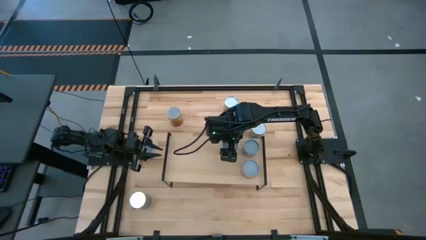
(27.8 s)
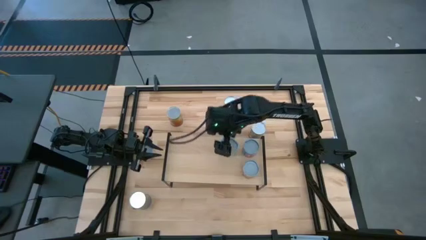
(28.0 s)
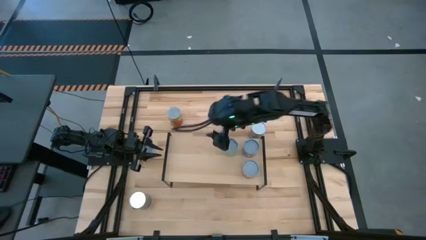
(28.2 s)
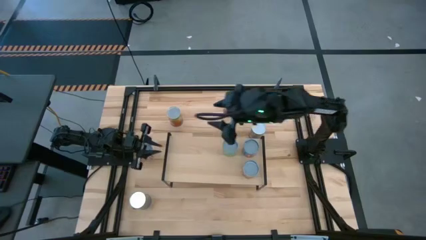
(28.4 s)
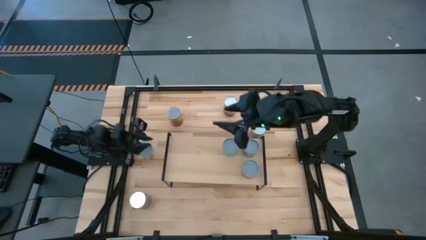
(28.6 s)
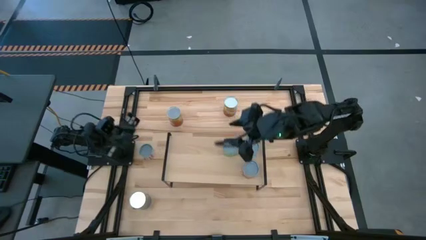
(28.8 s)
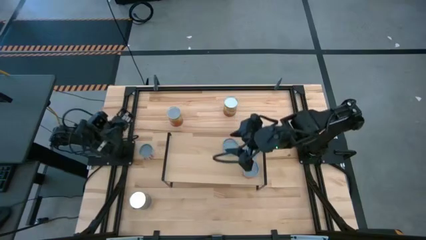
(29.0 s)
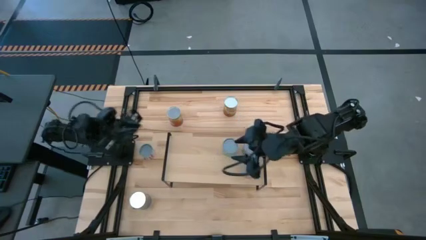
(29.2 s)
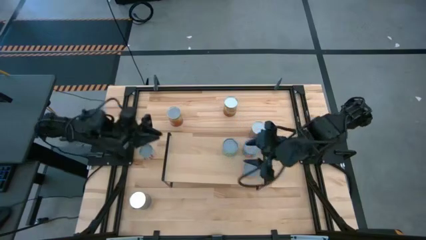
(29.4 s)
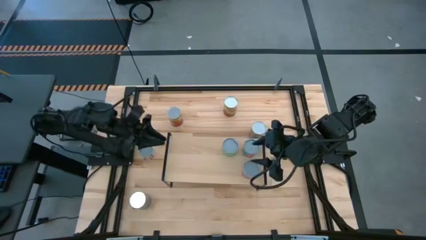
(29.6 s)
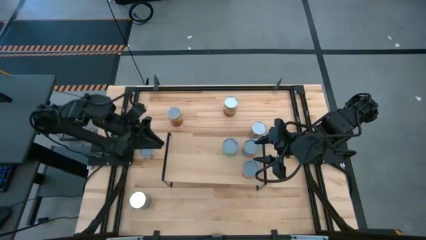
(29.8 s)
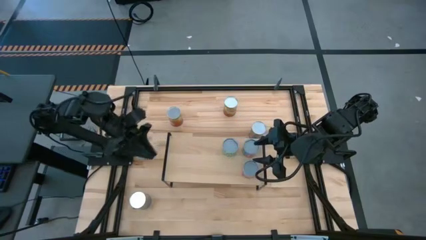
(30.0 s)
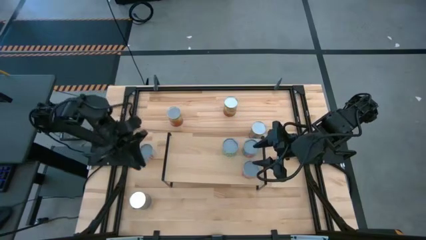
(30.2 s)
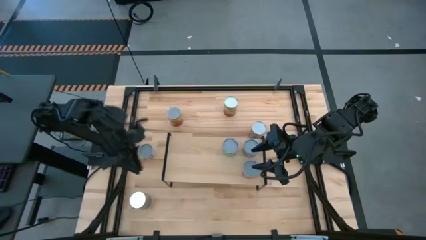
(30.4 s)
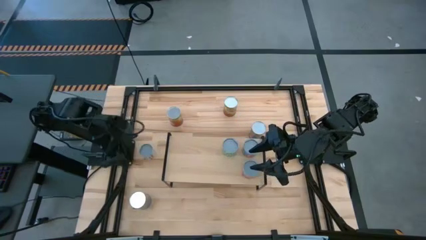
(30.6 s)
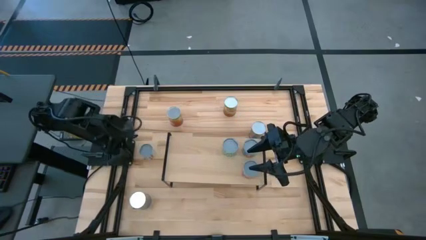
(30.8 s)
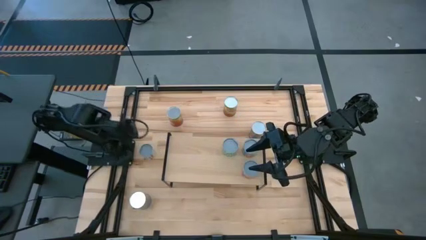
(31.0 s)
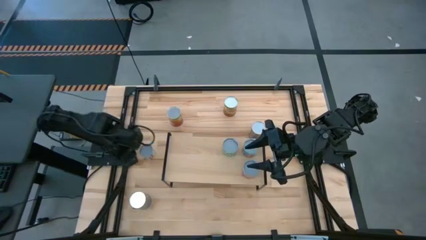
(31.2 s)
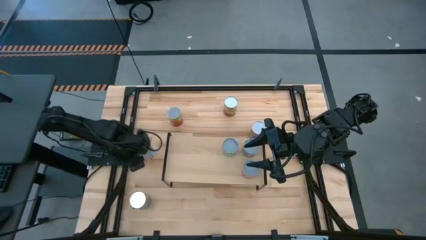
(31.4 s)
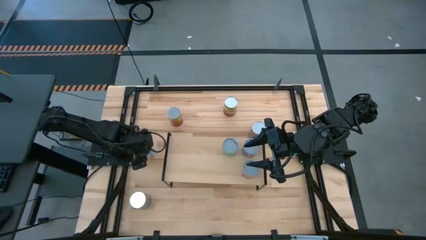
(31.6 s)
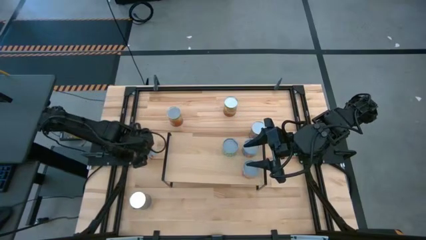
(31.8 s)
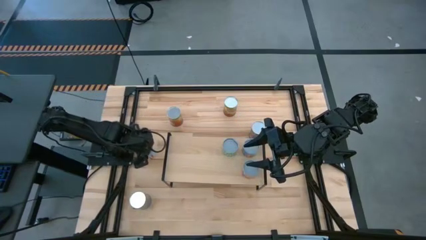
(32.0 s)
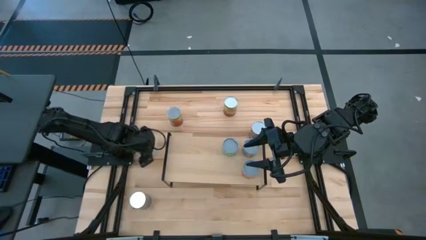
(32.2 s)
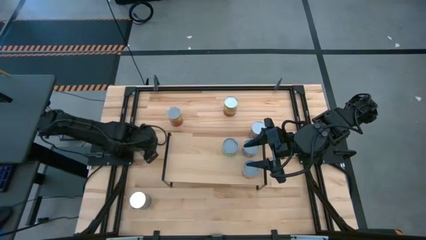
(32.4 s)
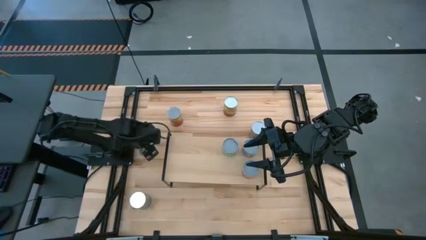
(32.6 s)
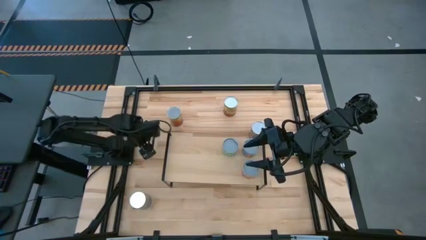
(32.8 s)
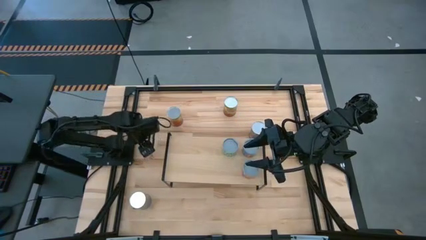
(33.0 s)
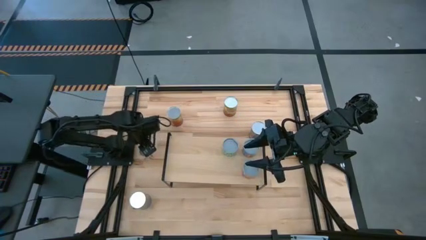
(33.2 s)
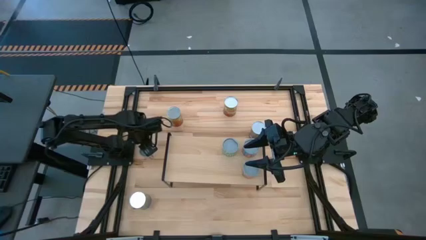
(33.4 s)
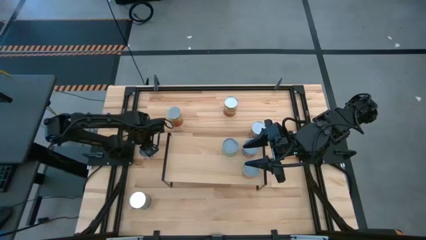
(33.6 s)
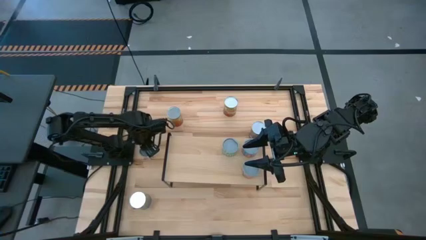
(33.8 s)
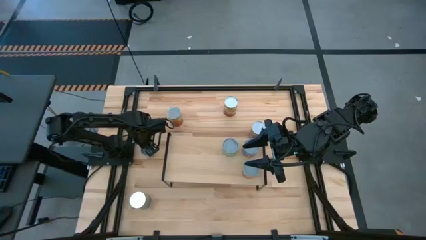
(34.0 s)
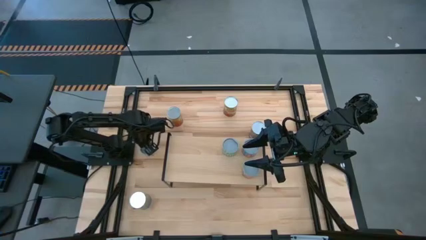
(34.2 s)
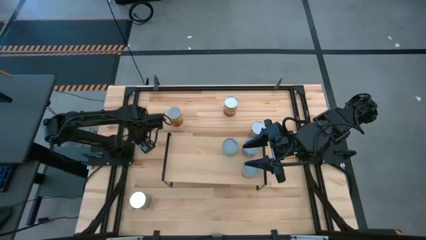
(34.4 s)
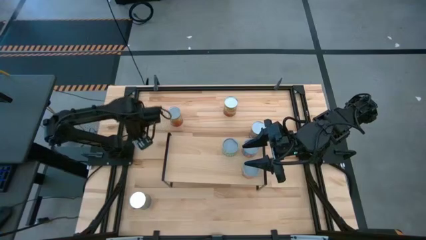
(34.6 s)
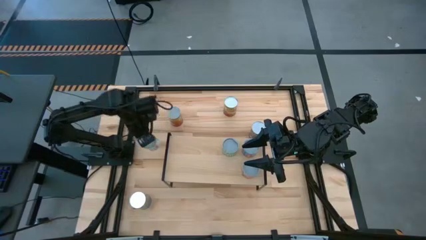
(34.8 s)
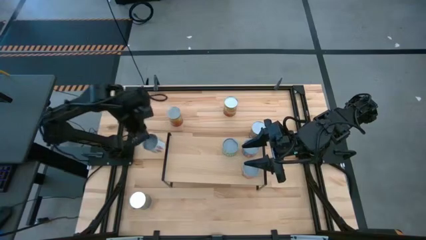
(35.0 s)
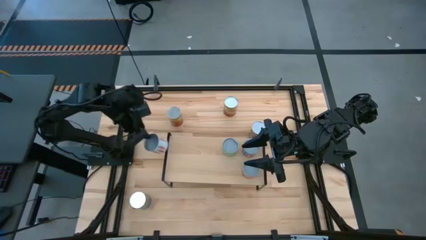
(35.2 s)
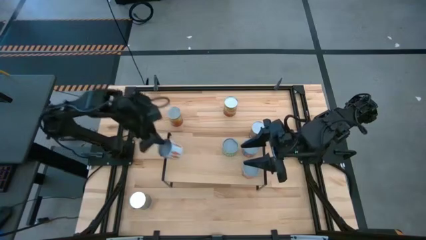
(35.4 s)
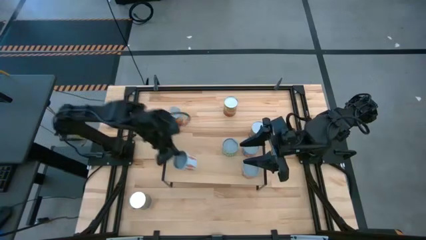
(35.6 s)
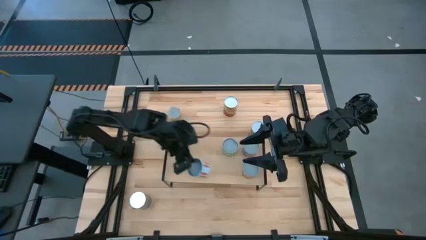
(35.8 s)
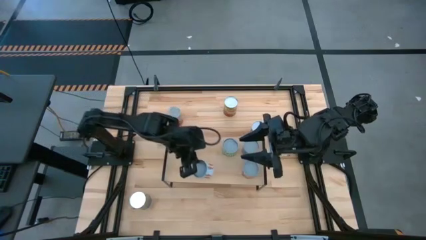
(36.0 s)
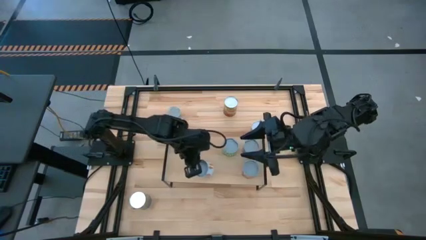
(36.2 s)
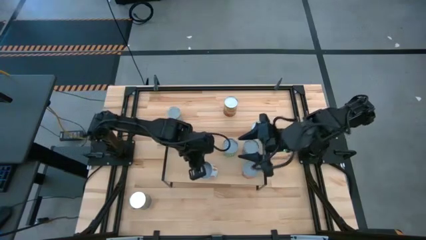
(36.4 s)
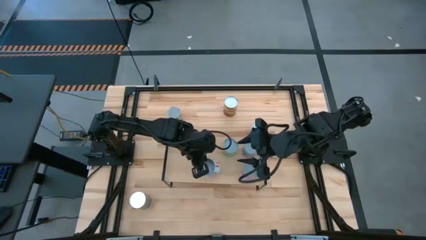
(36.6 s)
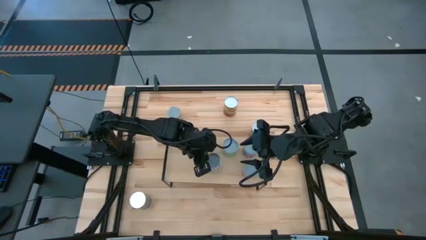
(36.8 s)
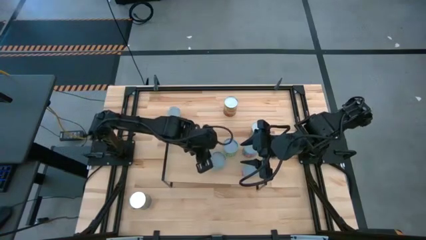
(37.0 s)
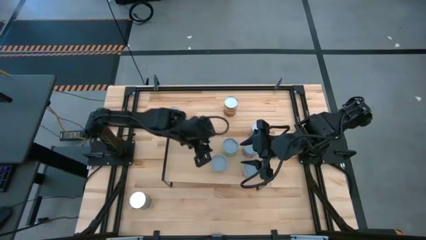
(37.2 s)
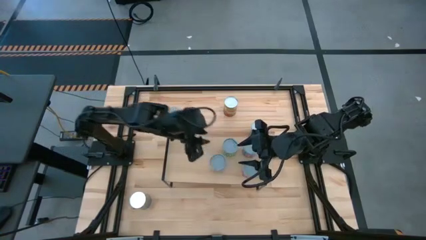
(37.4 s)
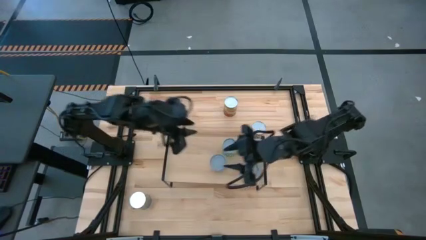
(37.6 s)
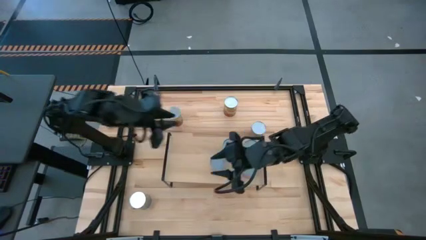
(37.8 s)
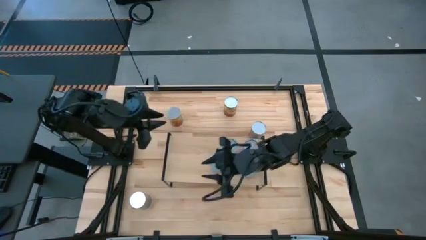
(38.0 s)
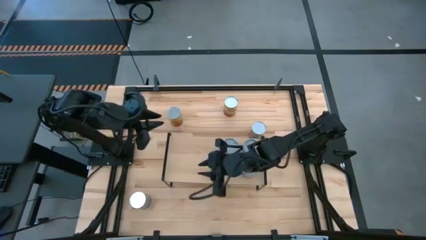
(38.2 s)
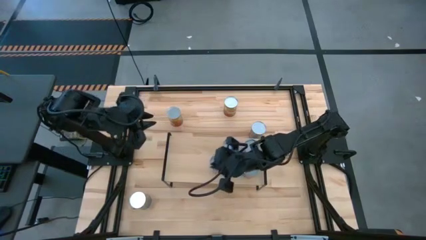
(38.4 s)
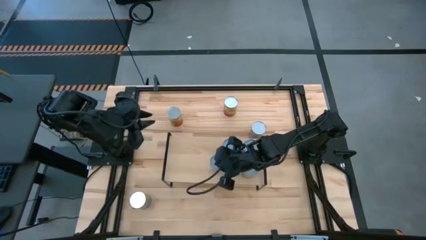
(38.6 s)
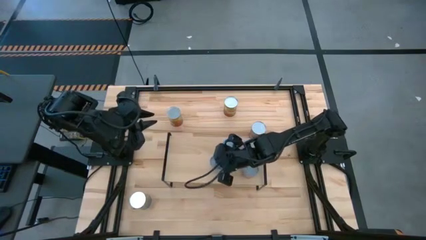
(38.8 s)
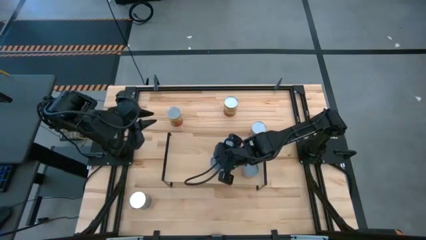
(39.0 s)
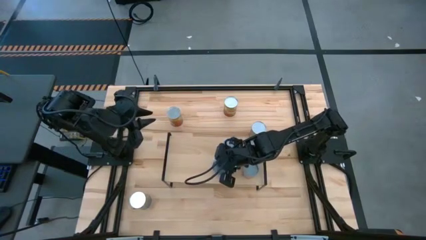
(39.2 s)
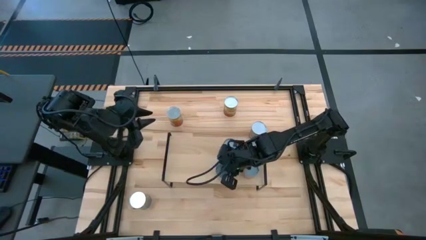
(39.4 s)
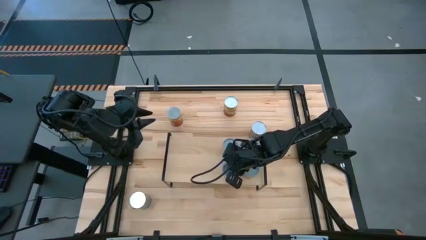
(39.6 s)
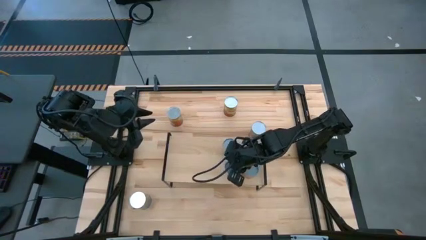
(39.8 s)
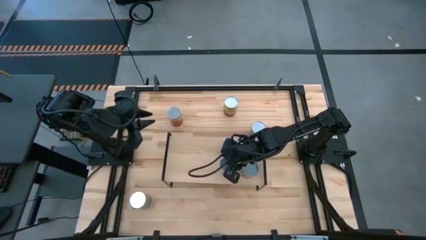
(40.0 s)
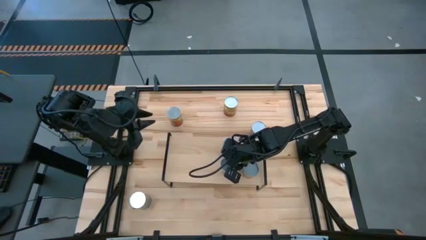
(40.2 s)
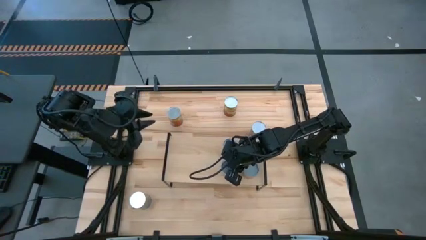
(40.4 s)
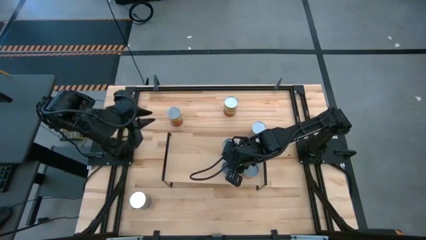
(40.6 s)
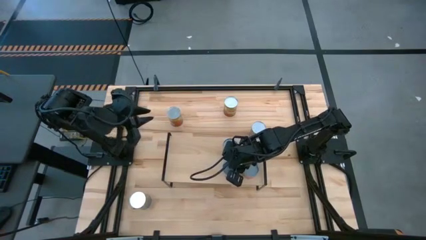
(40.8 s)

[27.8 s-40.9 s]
Task: Pick and place cans onto a shelf
Put the small canned carrots on the shelf

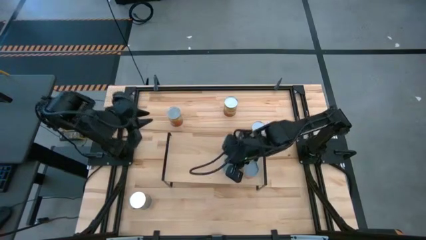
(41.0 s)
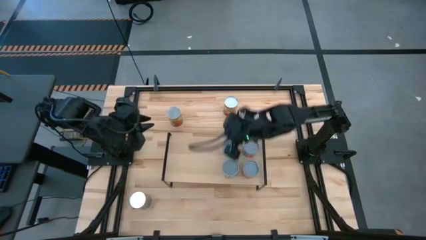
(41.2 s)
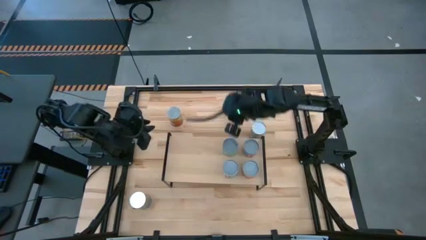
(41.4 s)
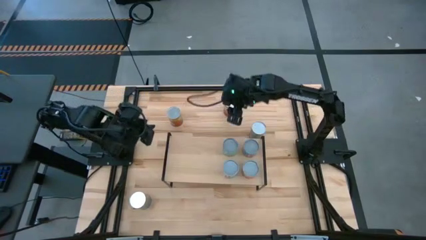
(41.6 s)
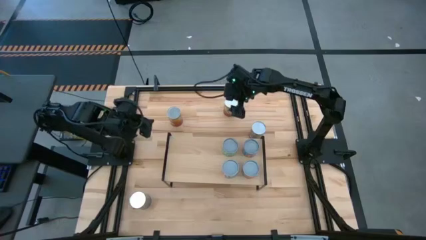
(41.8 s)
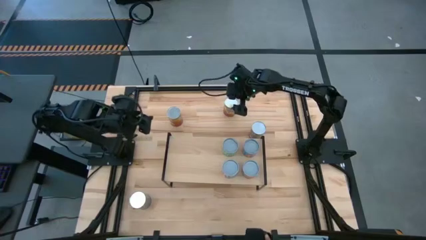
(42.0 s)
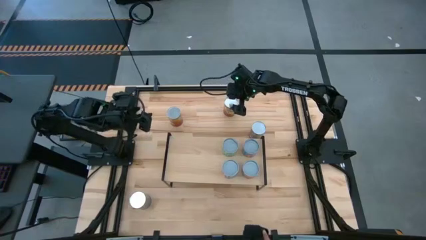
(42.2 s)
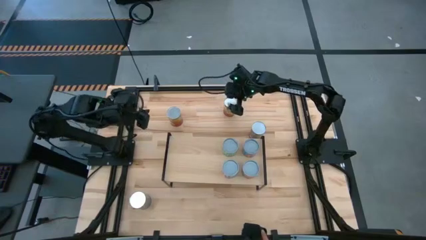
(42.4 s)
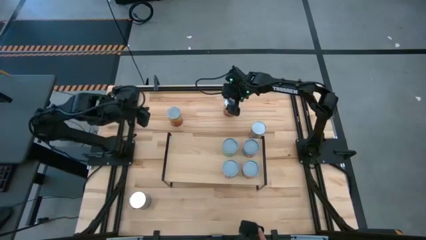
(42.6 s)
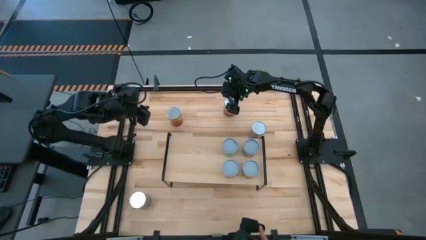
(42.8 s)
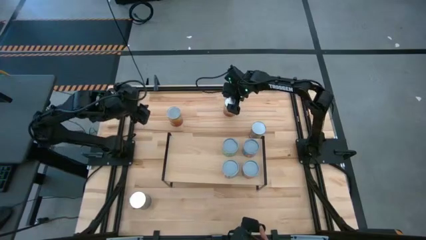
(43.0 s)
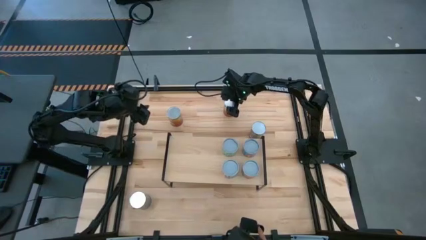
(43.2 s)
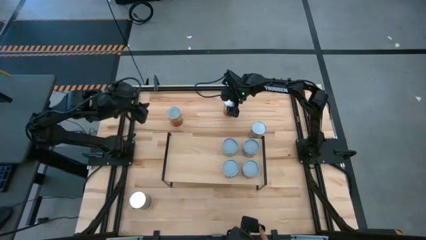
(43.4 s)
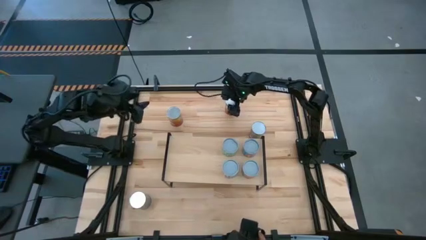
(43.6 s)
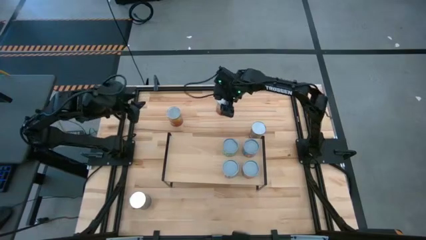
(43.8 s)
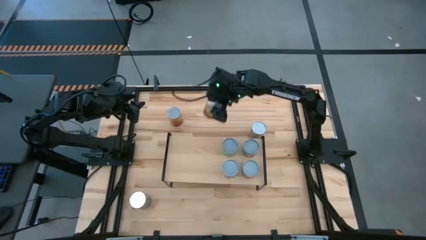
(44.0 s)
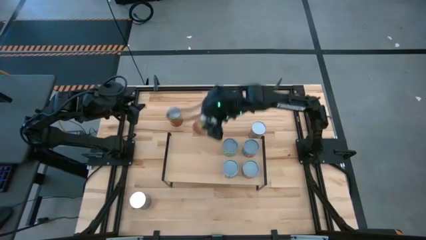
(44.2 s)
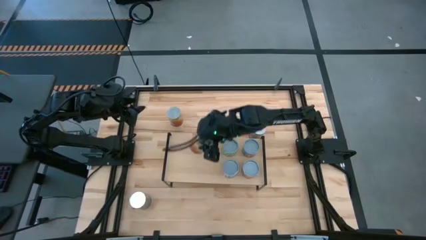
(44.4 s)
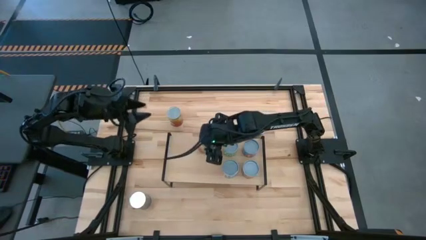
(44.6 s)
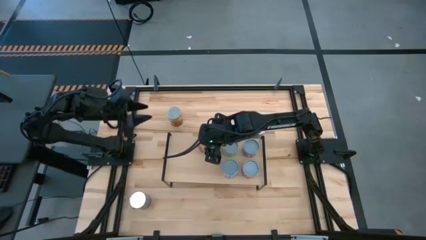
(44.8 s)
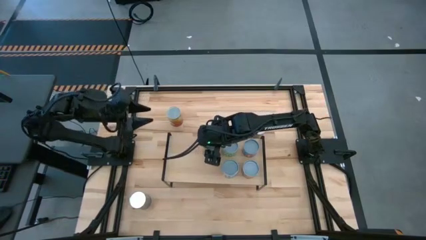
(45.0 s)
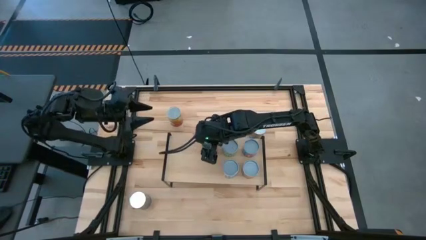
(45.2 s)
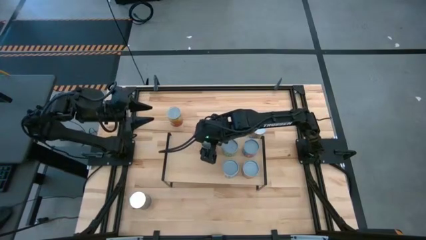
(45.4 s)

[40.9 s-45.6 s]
Put the right large canned corn on the shelf
